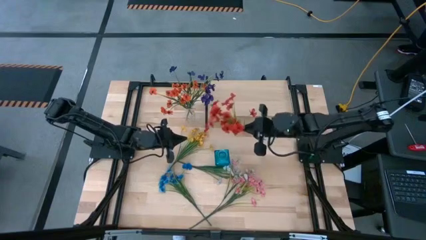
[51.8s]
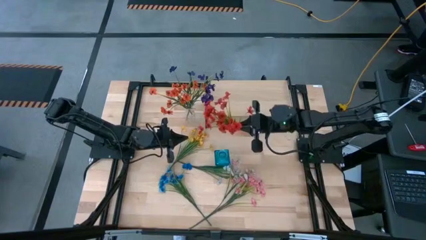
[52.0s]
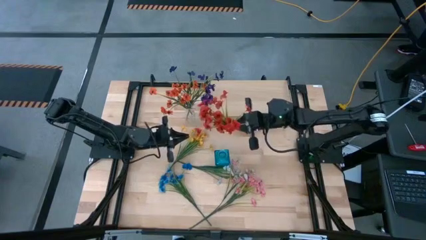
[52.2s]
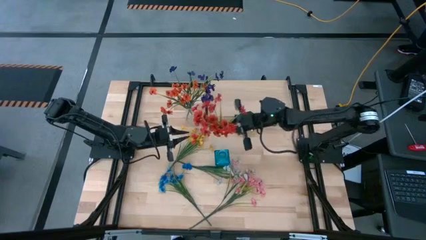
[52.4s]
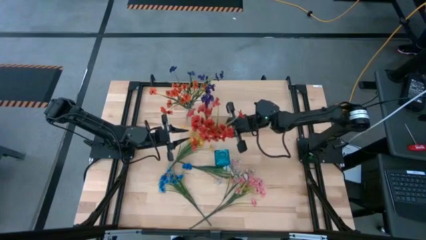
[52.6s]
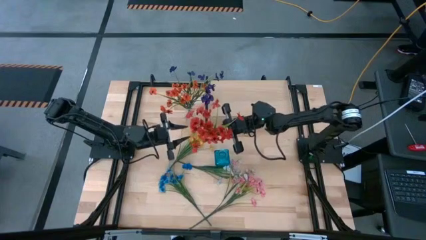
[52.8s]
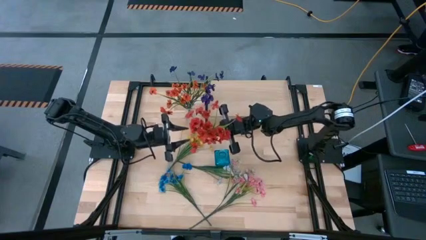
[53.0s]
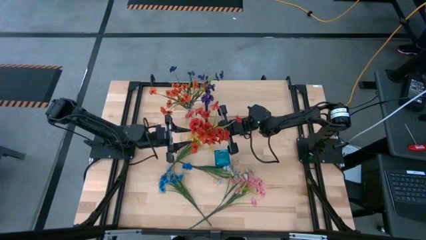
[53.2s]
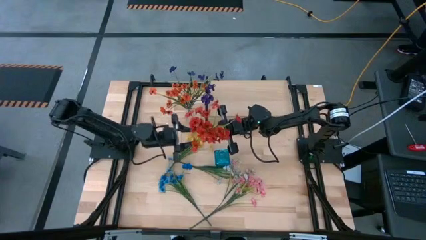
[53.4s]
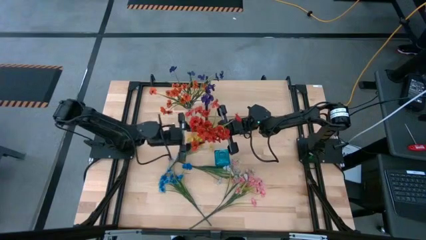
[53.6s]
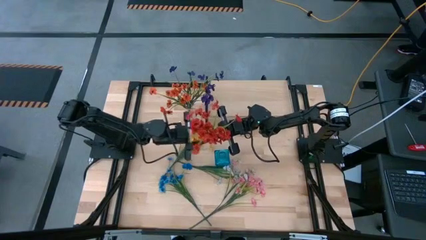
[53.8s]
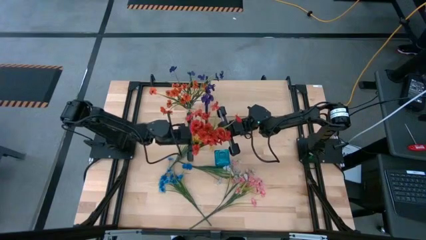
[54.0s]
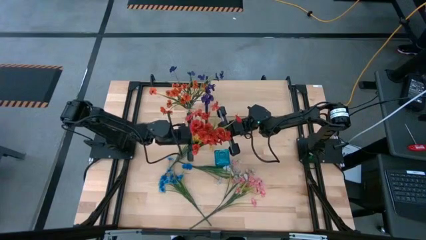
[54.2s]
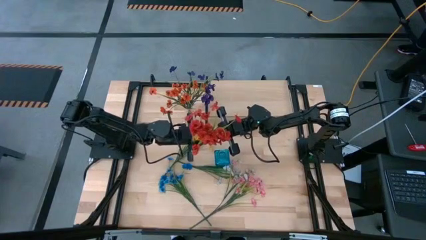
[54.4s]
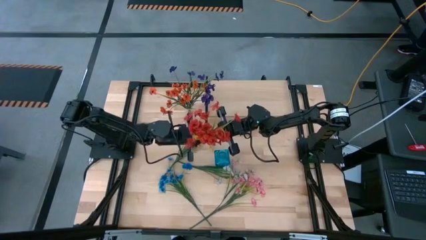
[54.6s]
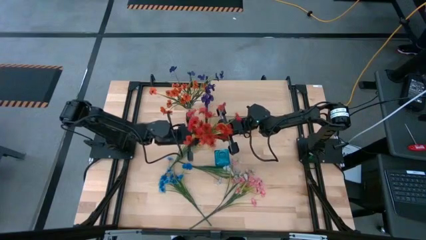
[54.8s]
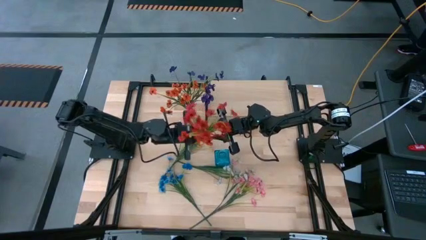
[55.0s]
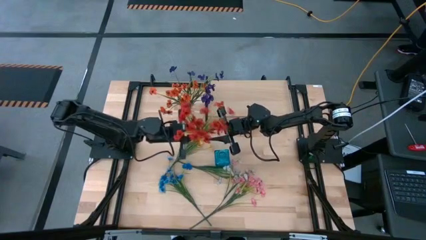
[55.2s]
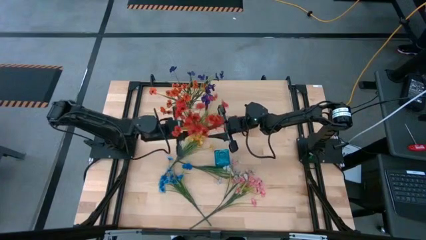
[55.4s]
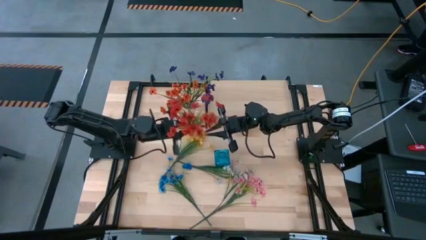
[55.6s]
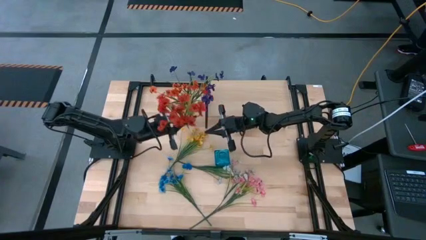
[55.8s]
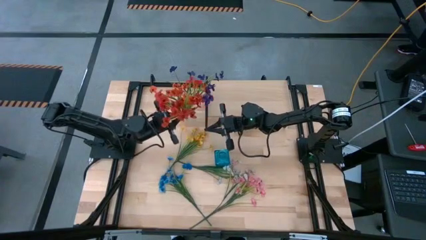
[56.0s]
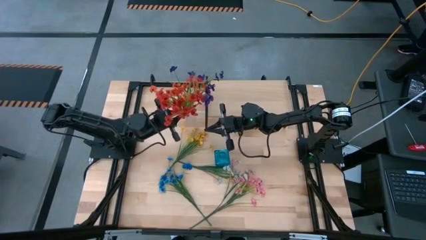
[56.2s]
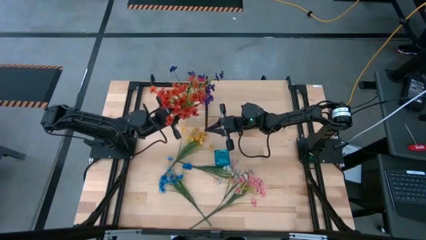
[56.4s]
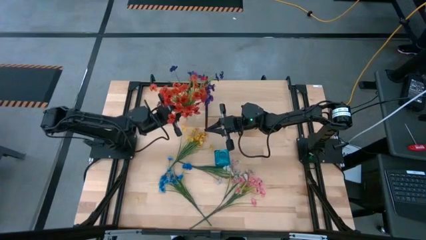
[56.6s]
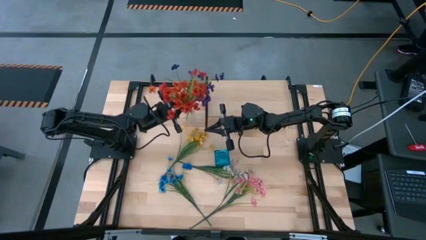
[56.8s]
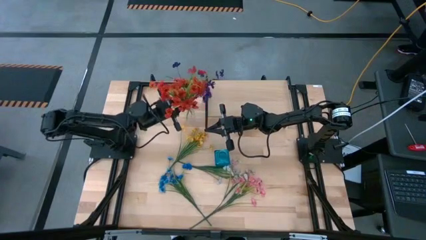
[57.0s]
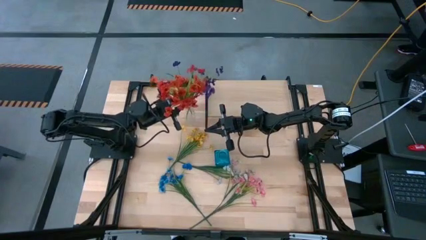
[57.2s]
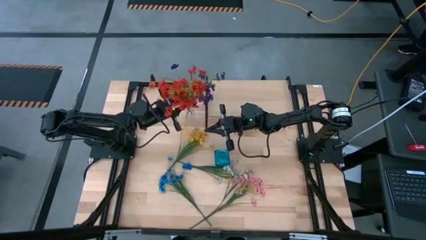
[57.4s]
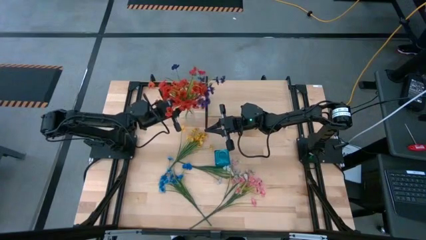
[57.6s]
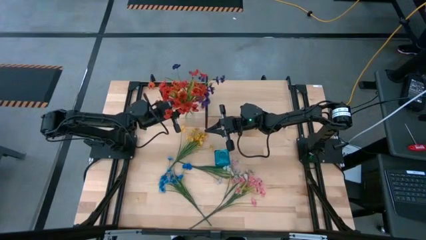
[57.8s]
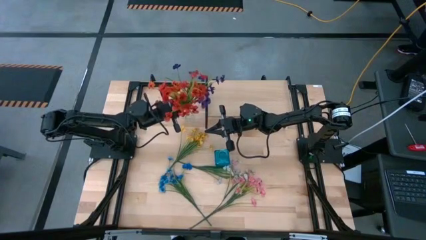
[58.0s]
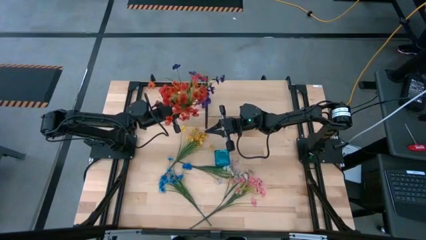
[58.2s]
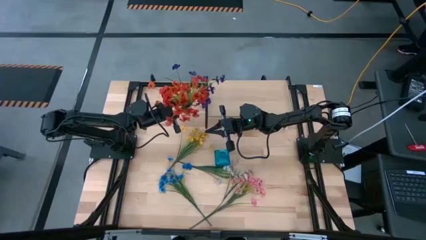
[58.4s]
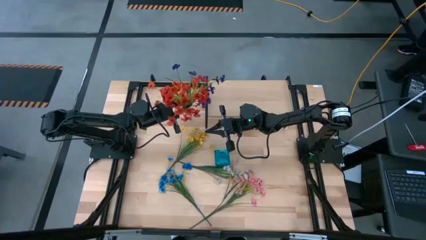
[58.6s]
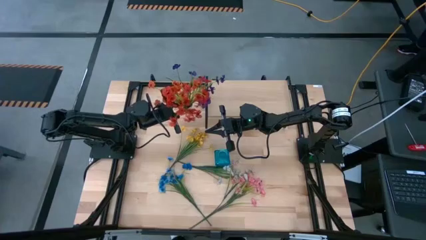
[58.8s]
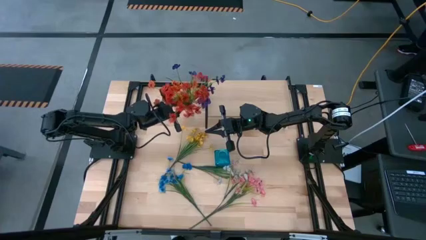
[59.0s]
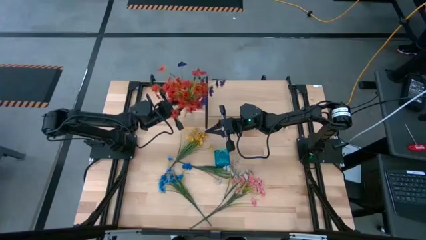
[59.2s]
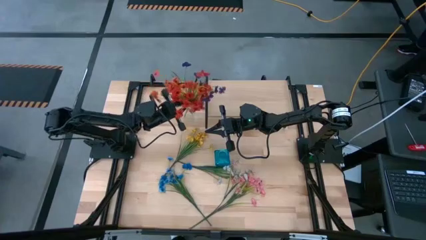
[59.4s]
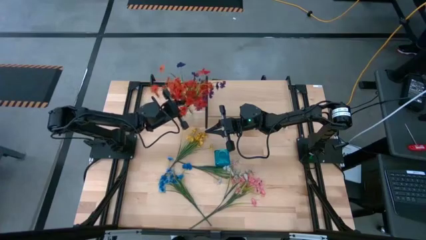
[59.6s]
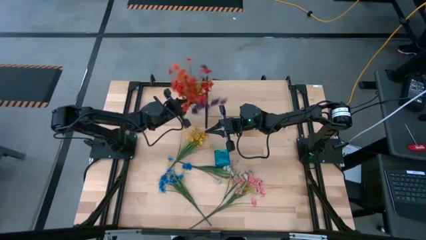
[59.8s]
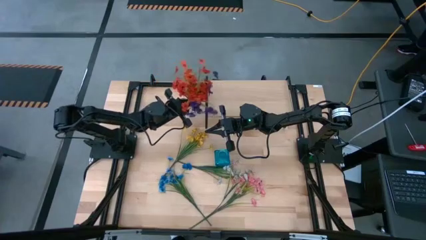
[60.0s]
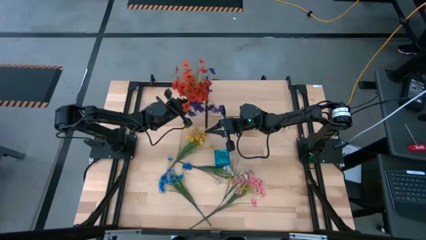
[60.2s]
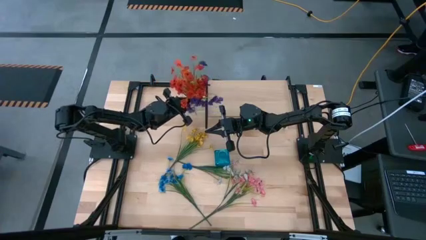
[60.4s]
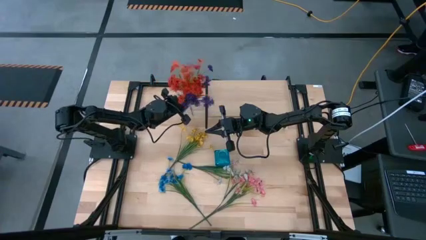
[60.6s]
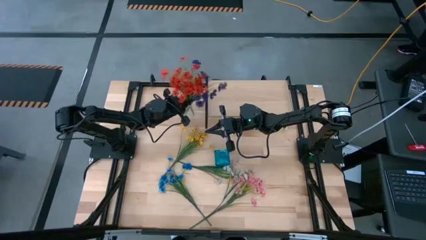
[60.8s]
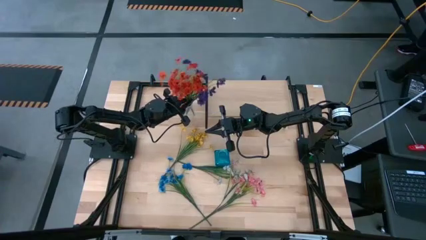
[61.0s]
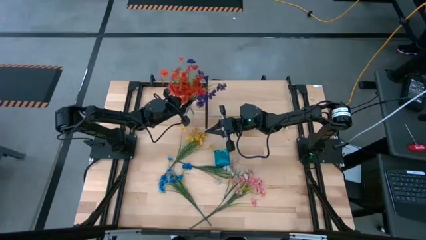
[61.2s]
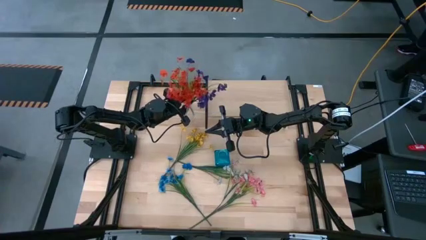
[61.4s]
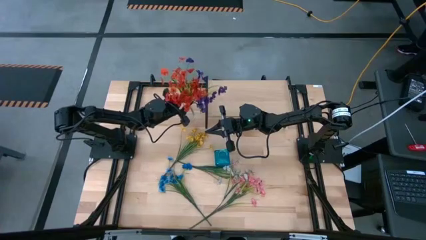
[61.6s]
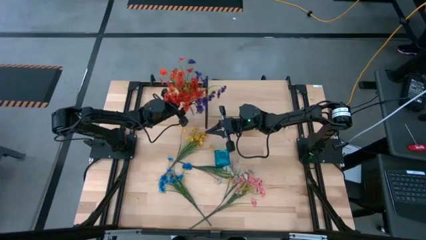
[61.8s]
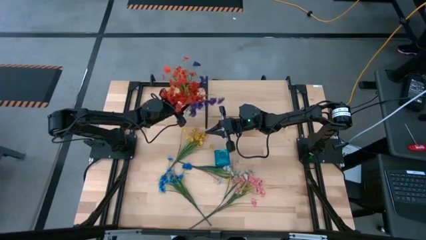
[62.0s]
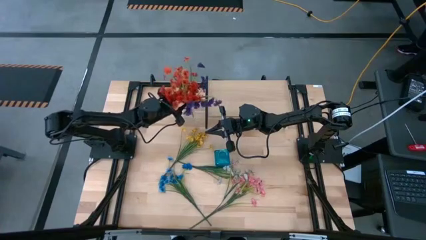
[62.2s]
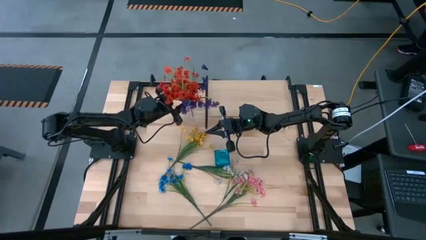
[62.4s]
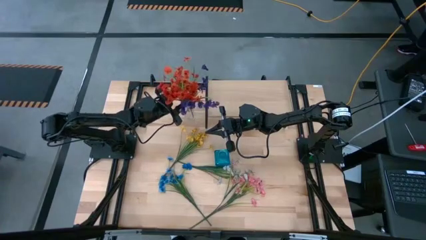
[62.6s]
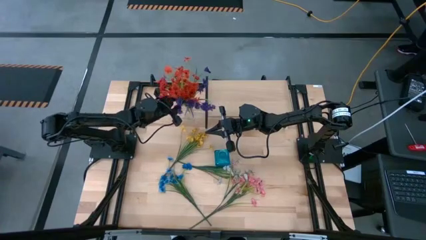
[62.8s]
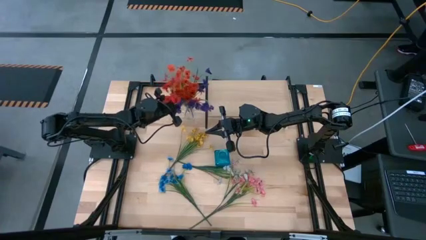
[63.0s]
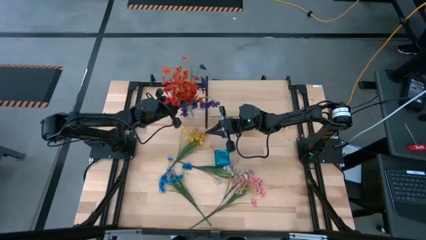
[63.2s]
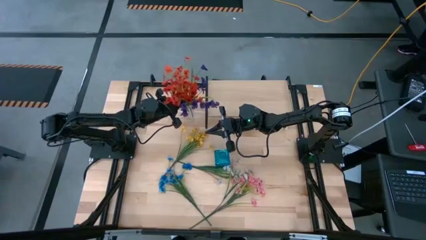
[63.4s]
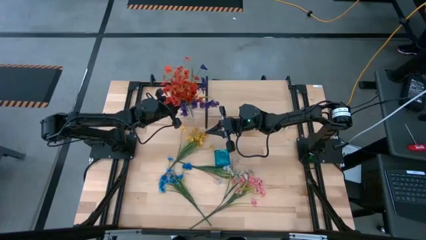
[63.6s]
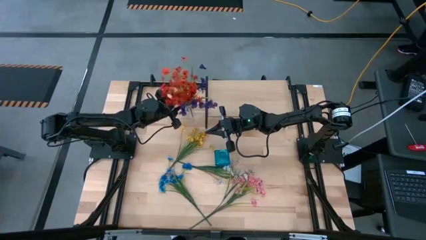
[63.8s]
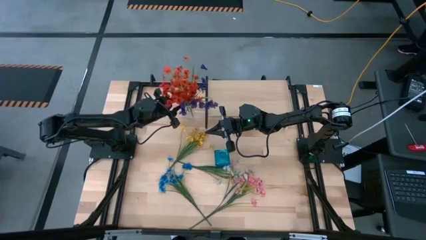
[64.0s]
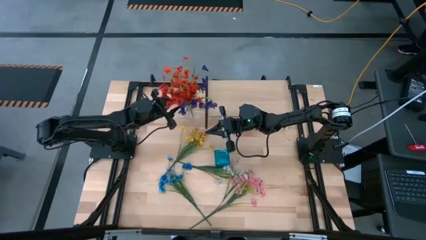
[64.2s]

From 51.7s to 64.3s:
Task: Pick and place flowers into a vace then onto a shelf
Put the red flowers into the transparent vase
